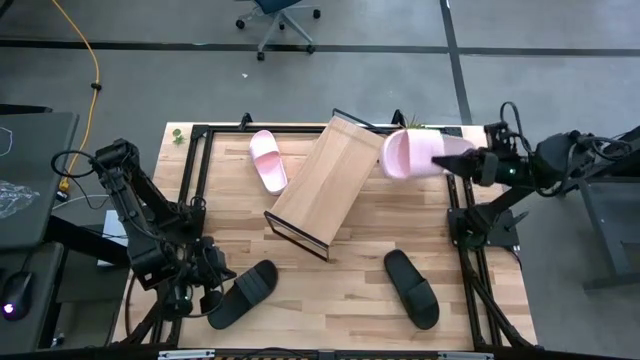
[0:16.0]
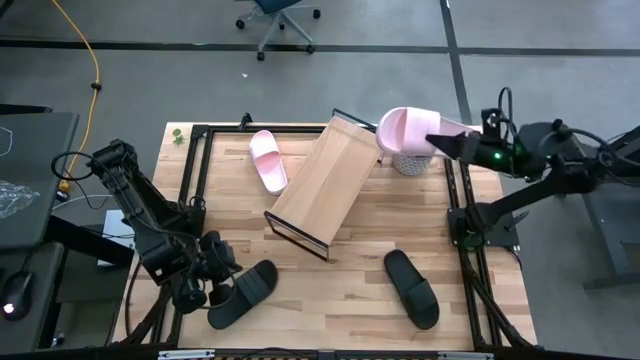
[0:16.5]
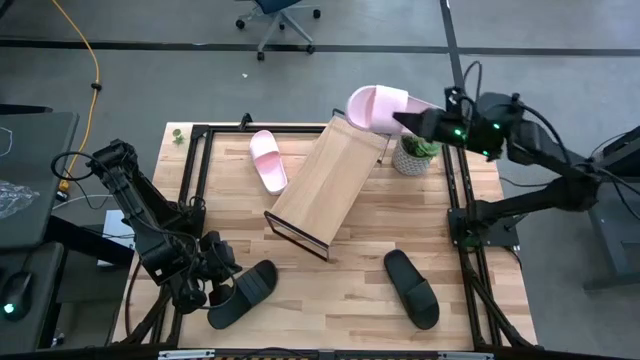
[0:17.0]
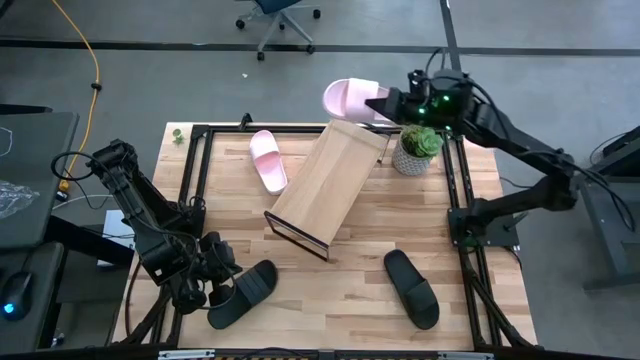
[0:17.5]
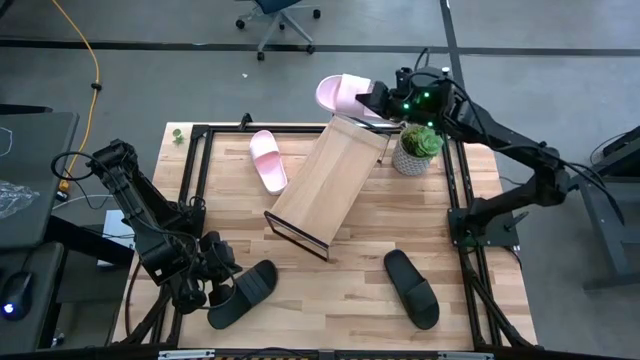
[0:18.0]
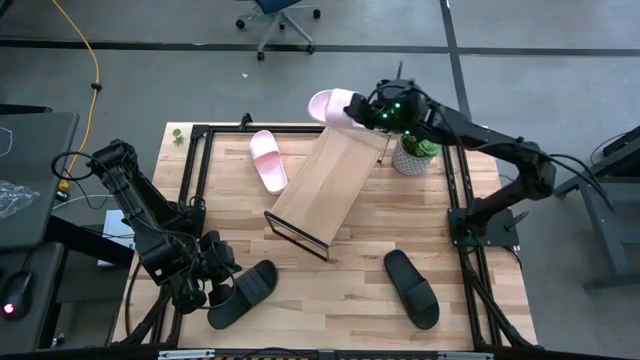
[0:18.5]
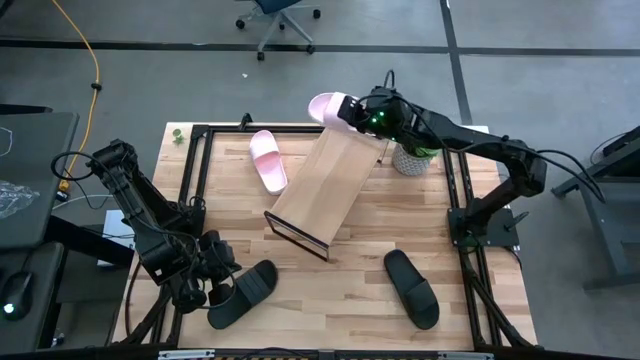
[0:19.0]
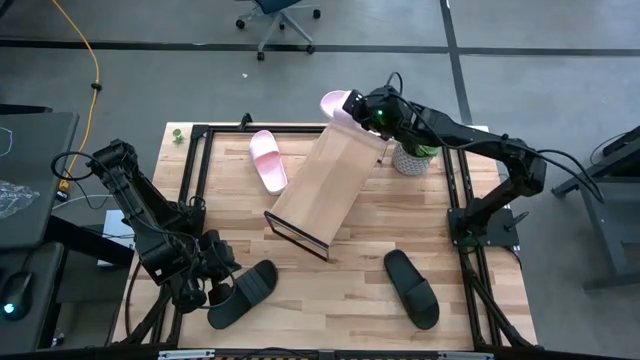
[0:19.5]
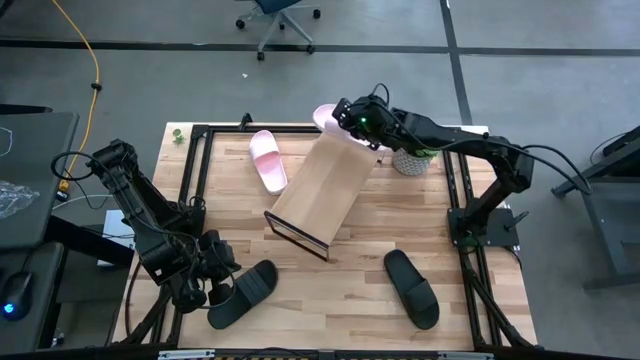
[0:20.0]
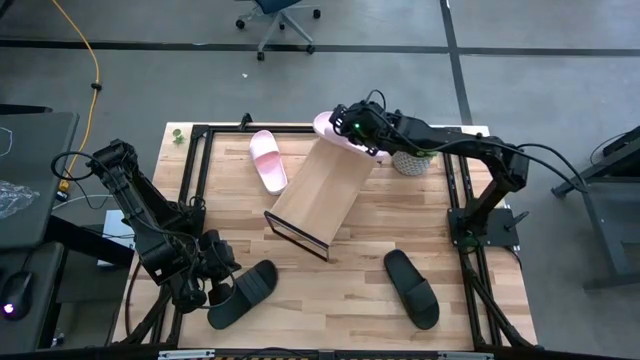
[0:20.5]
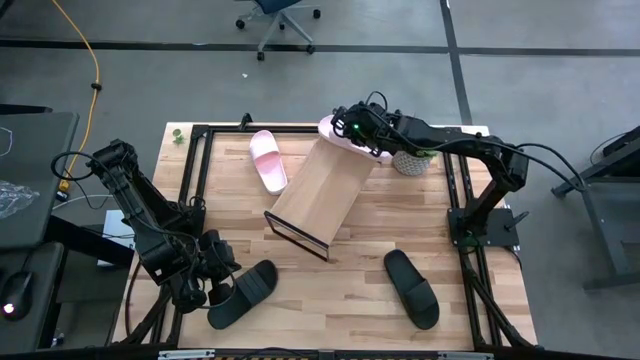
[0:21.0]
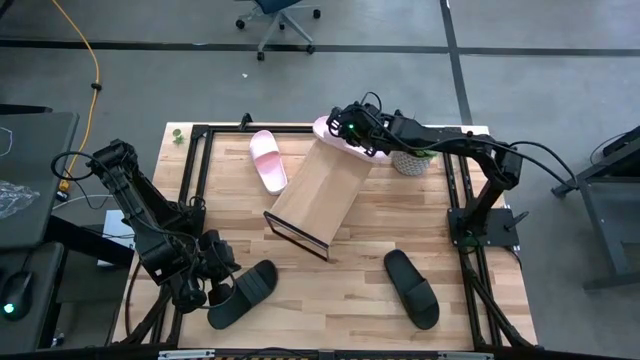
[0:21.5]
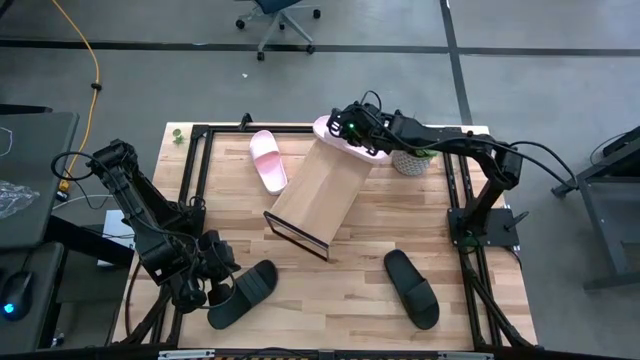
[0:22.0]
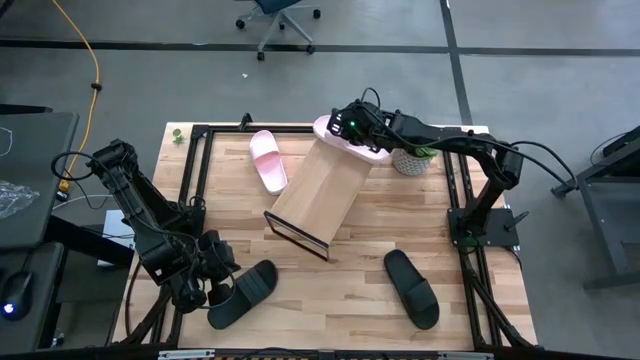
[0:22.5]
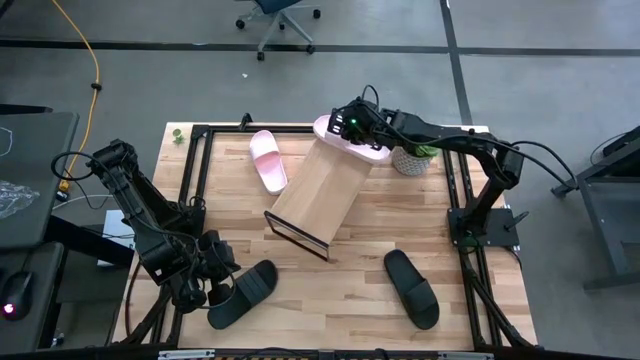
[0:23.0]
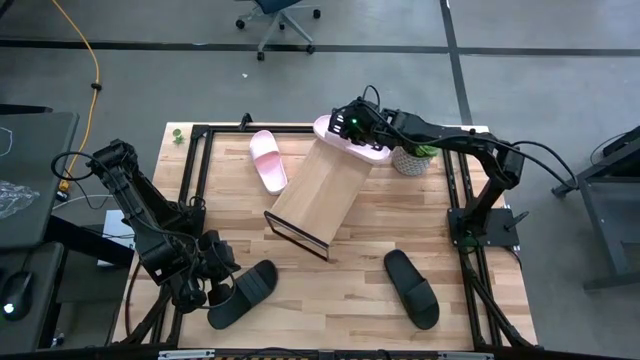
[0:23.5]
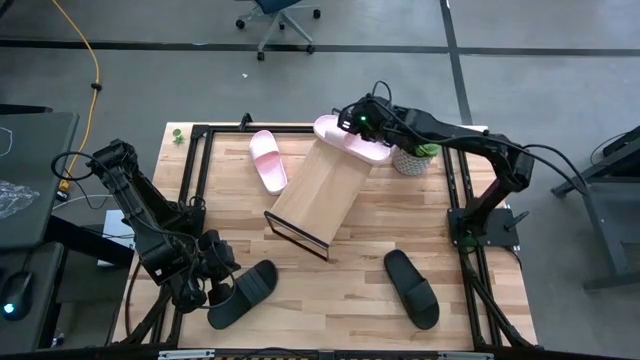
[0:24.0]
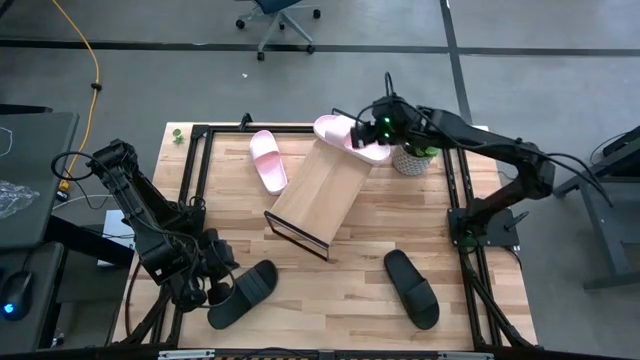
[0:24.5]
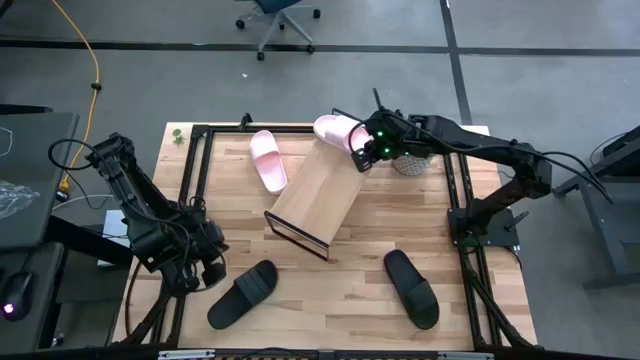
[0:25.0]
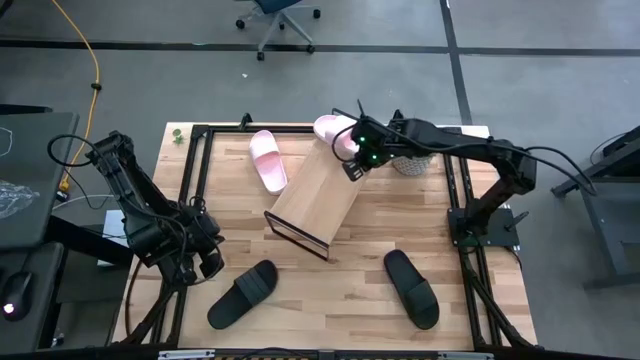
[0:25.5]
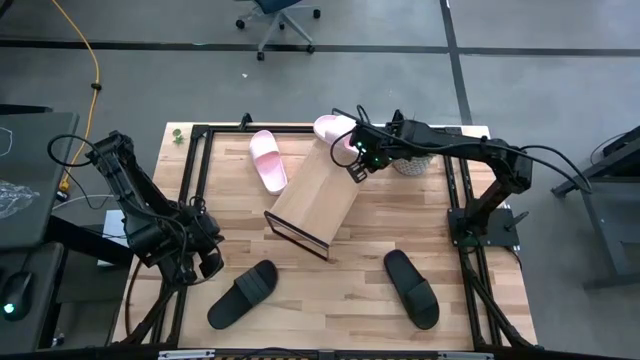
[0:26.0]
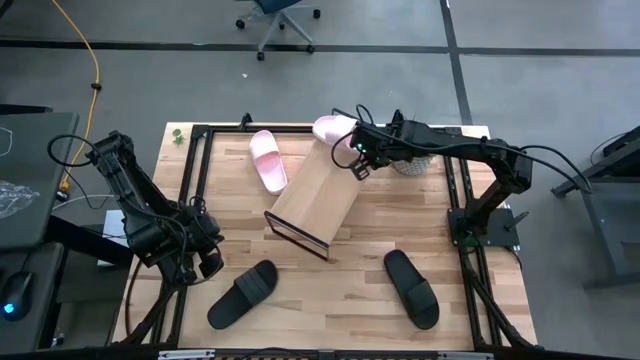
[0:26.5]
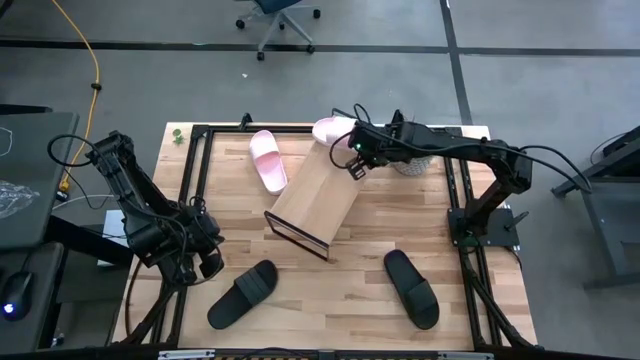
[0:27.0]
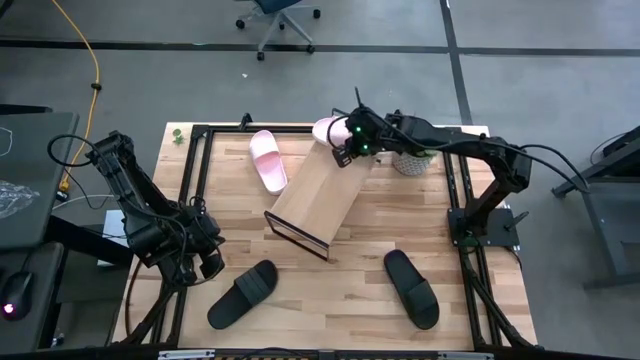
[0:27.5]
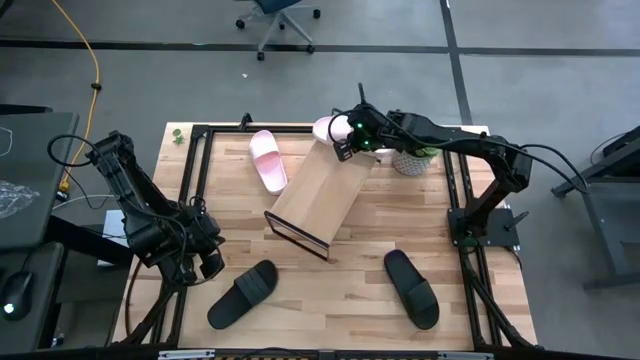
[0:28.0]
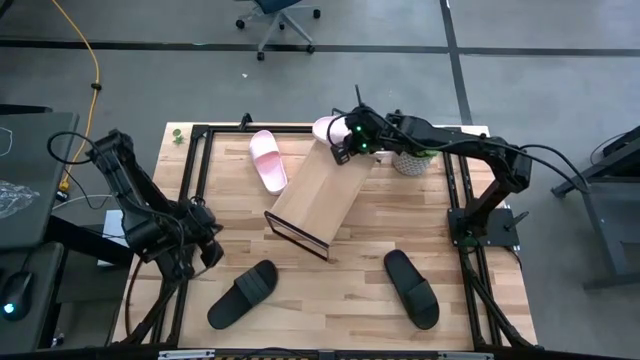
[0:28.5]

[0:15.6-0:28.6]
Task: Pick and place slides into the shelf
Put the bottom pink slide on the shelf

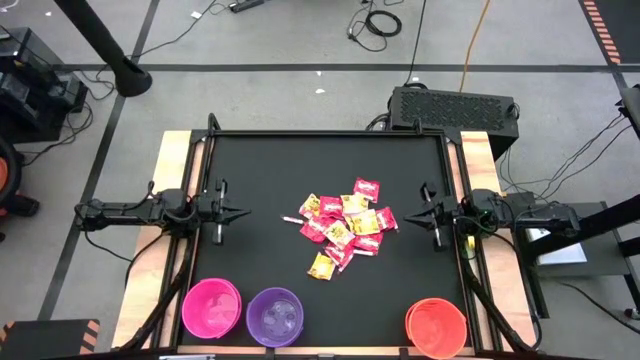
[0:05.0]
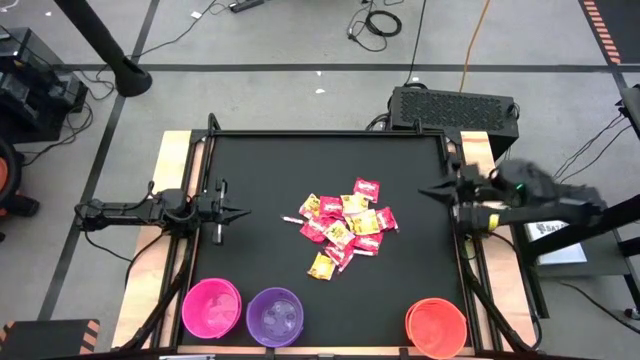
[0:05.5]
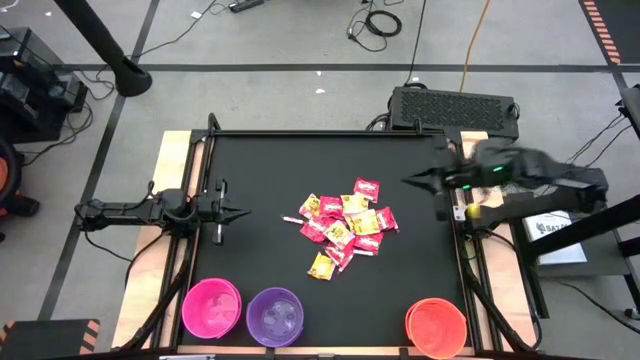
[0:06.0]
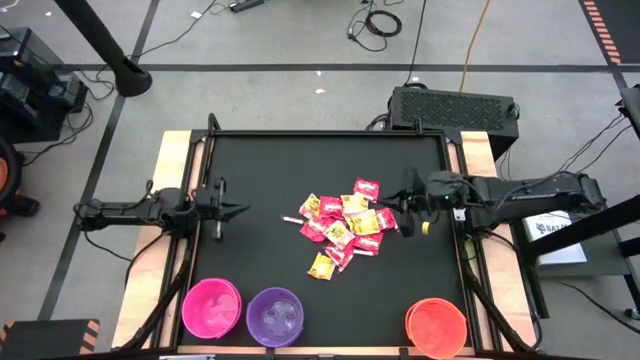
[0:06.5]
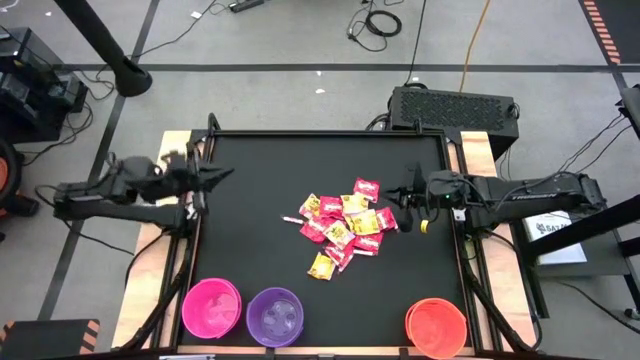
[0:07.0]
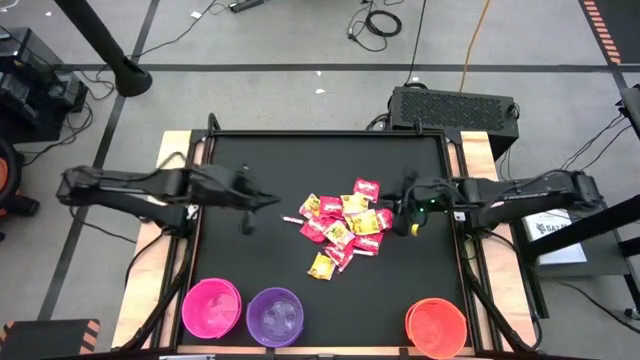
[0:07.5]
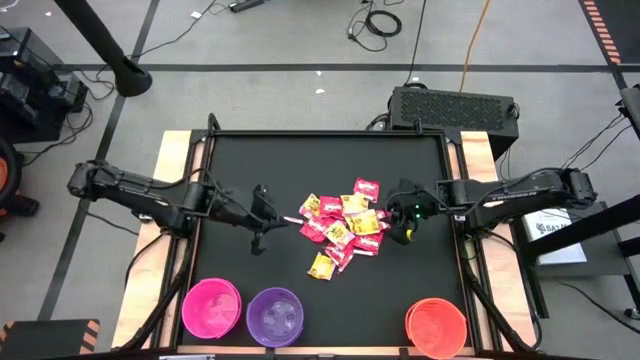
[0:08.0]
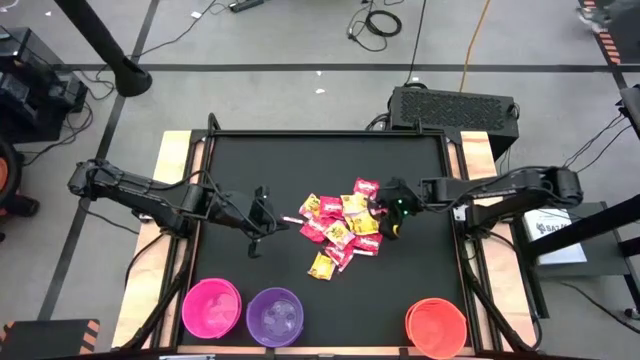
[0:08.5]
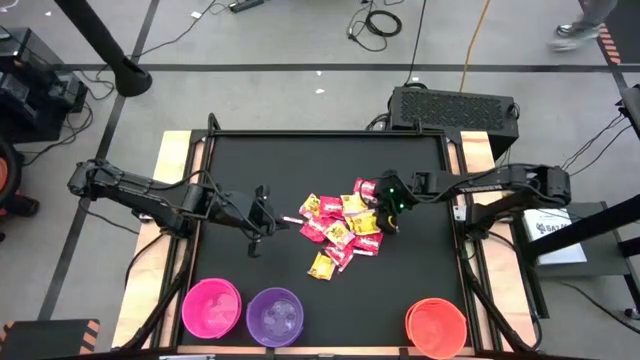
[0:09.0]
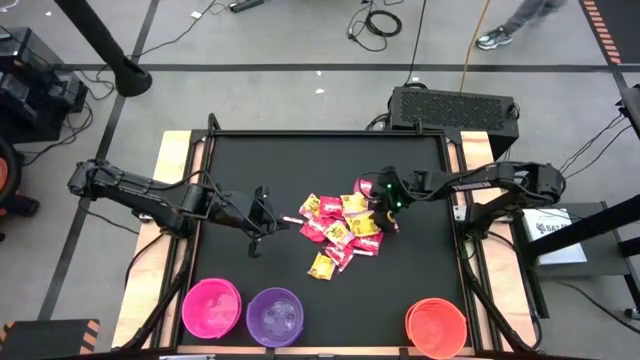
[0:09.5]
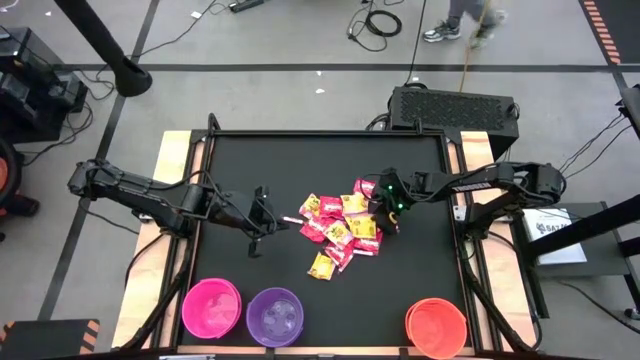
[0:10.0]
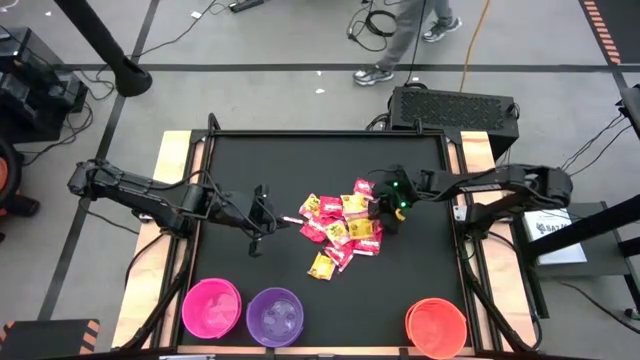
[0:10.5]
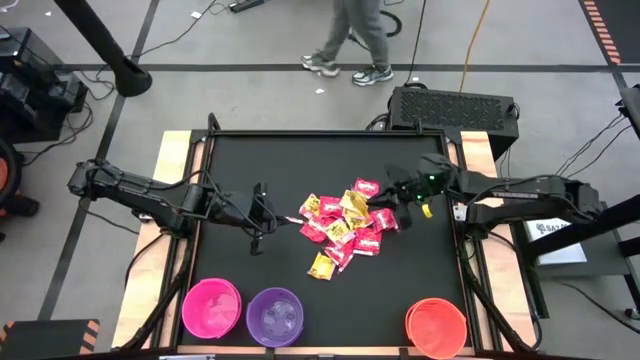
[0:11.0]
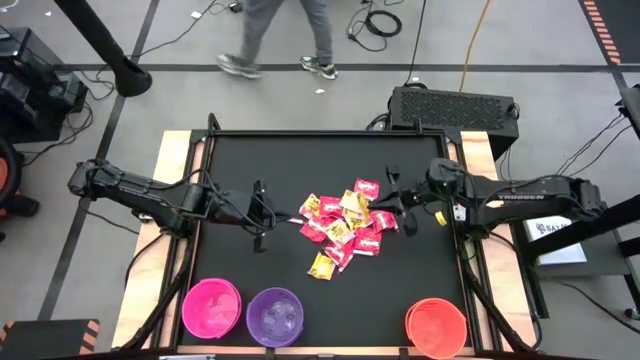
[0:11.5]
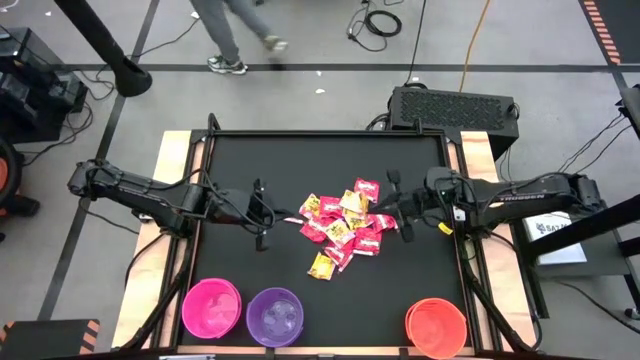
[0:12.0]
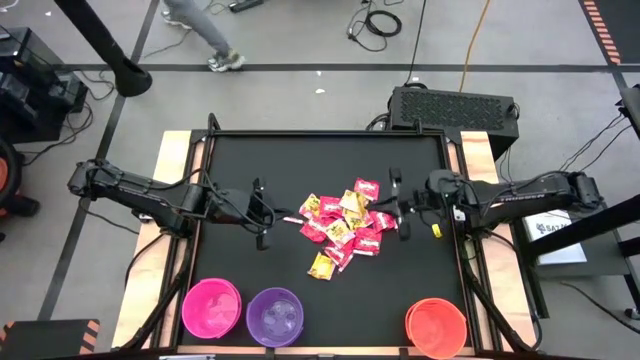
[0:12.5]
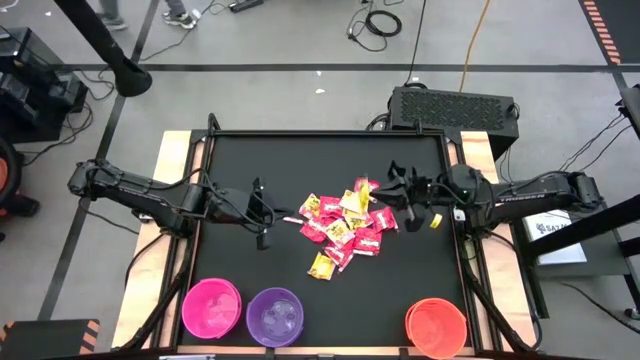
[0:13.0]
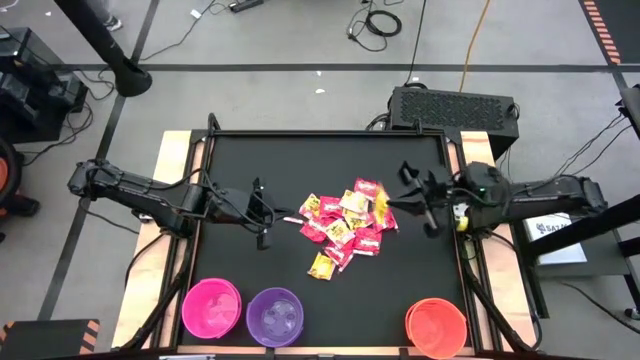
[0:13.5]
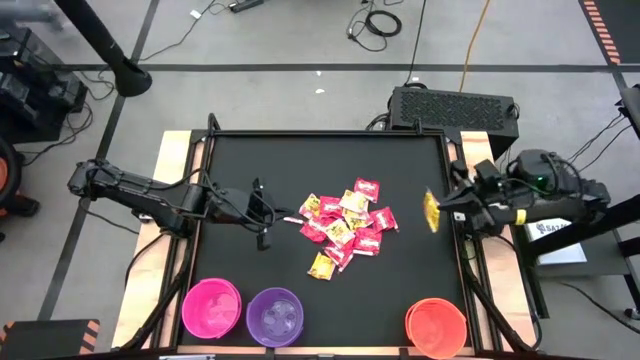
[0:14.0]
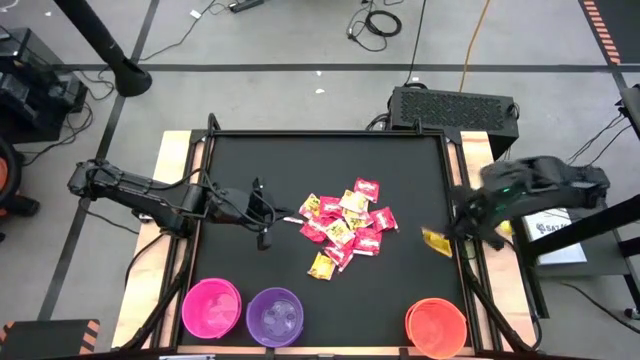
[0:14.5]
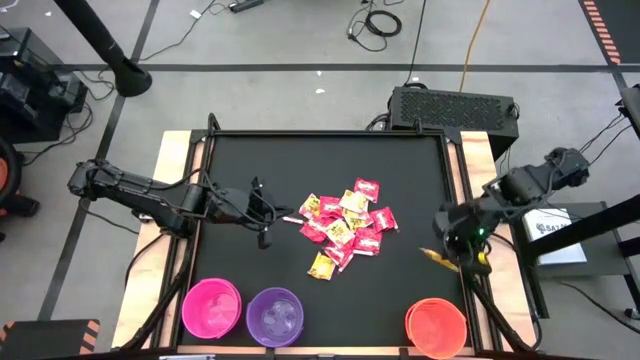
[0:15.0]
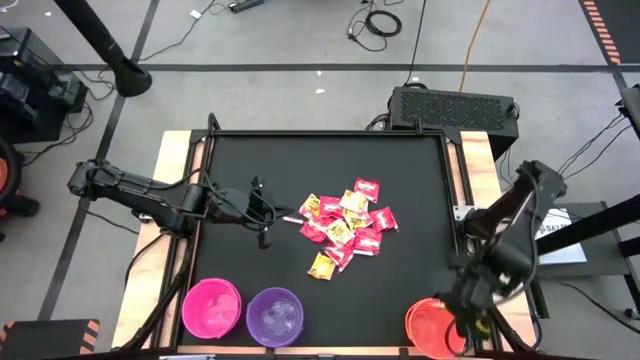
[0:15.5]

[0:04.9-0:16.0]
Task: Sort candy by brand, put in halloween buckets
Put the yellow candy into the orange bucket
